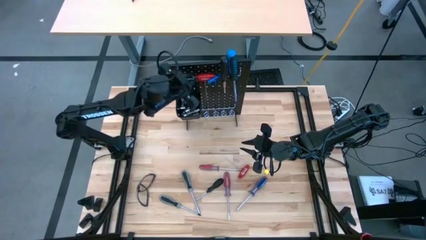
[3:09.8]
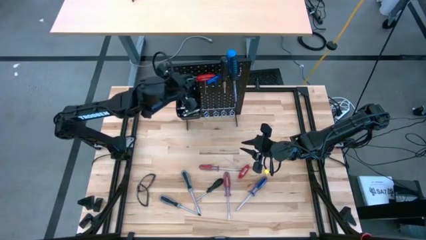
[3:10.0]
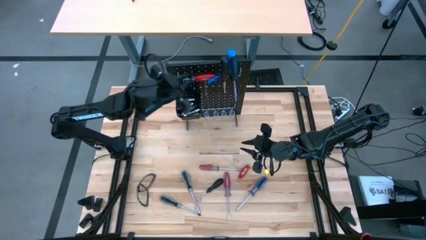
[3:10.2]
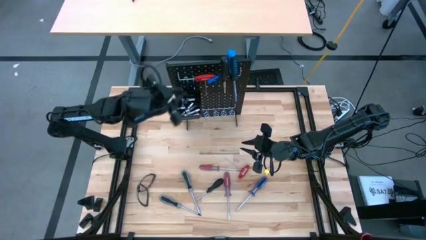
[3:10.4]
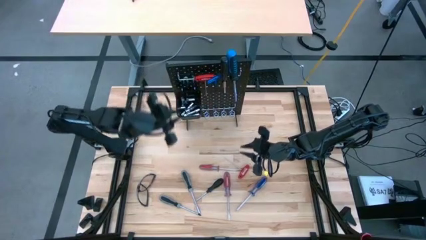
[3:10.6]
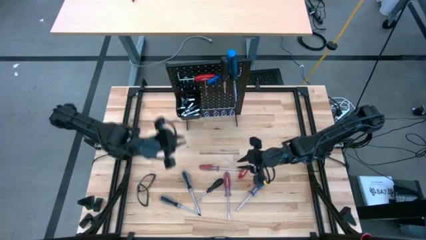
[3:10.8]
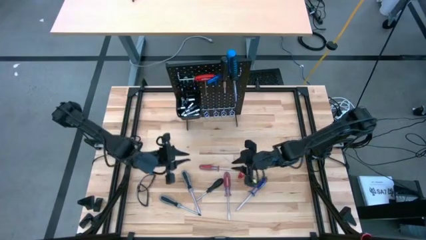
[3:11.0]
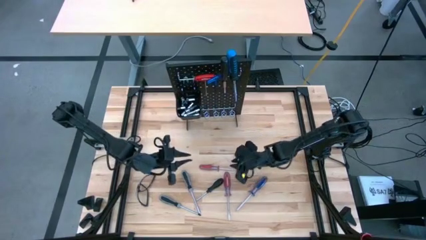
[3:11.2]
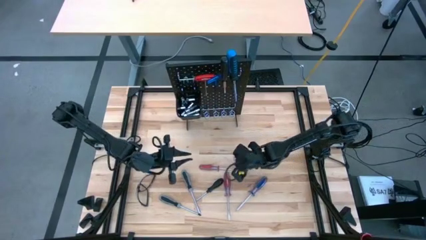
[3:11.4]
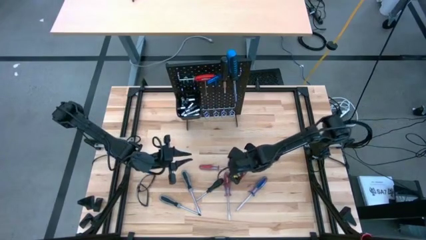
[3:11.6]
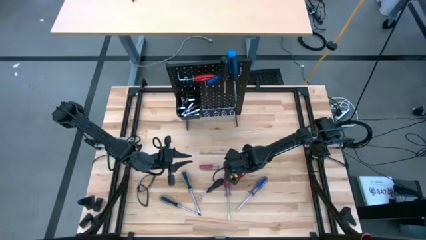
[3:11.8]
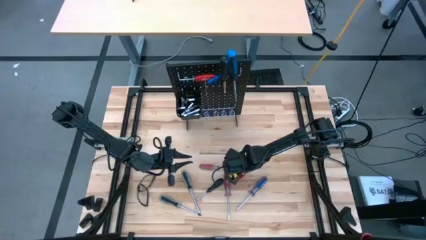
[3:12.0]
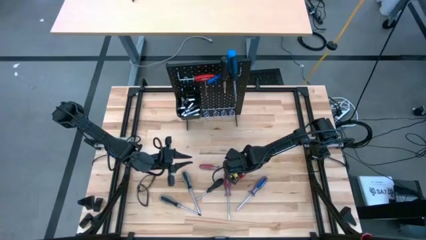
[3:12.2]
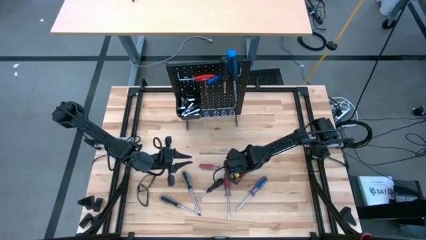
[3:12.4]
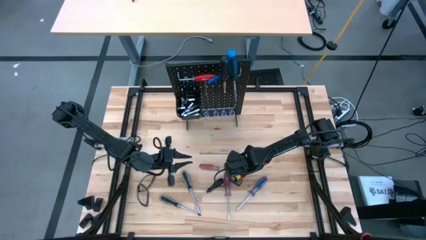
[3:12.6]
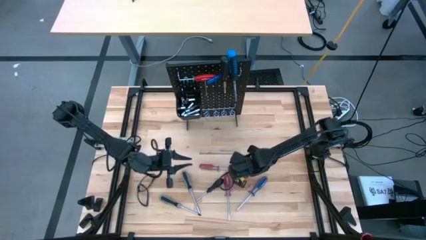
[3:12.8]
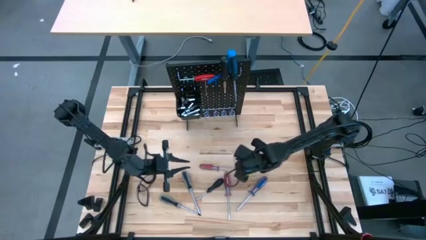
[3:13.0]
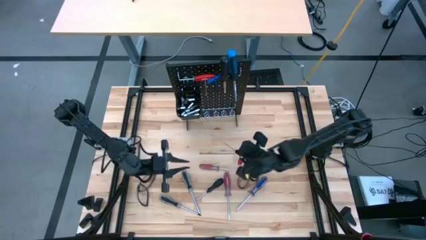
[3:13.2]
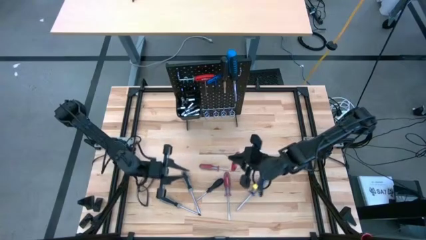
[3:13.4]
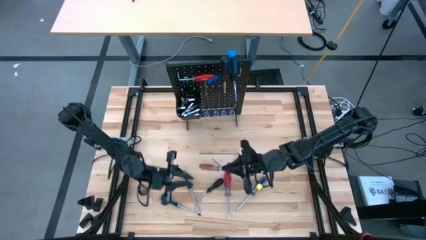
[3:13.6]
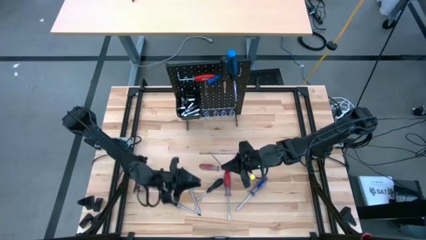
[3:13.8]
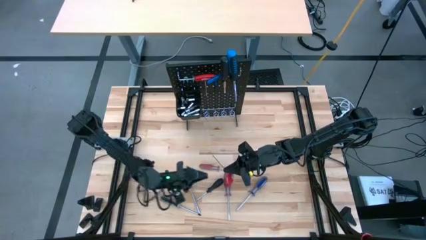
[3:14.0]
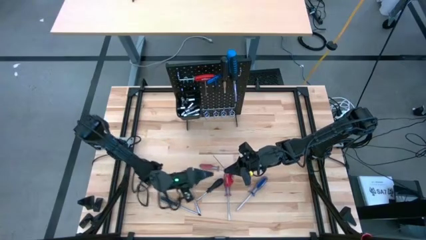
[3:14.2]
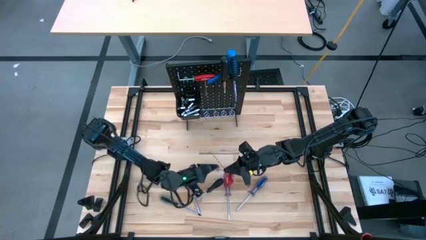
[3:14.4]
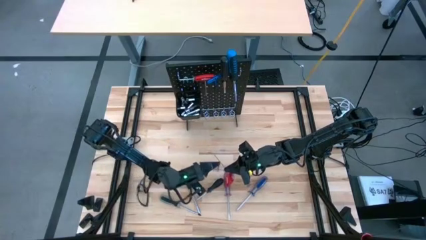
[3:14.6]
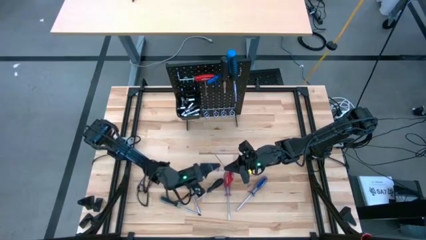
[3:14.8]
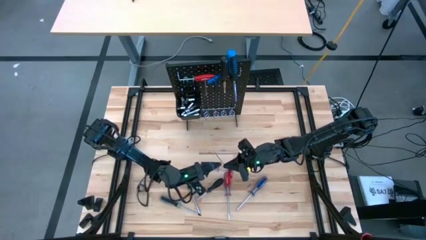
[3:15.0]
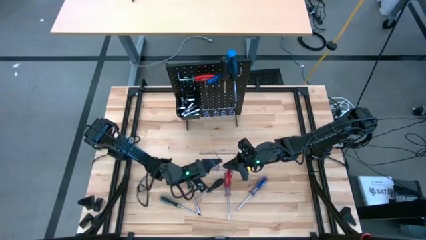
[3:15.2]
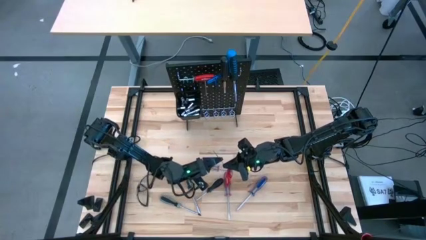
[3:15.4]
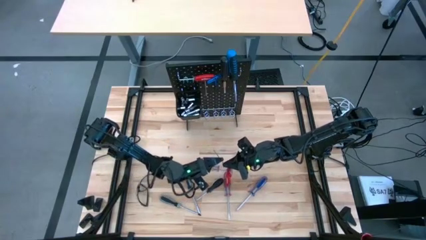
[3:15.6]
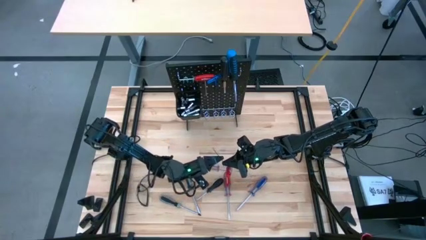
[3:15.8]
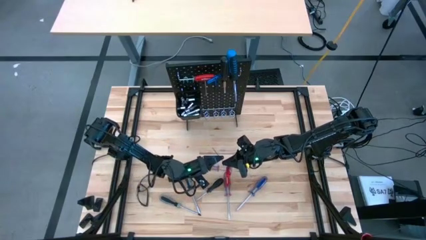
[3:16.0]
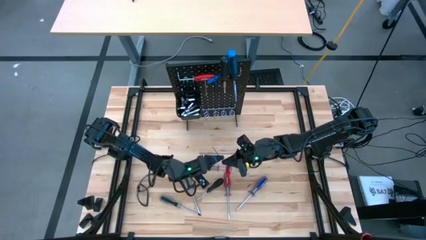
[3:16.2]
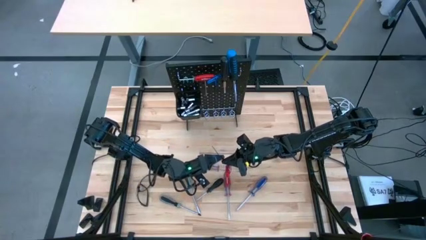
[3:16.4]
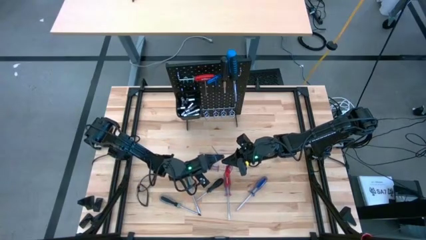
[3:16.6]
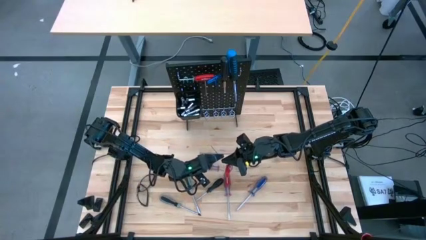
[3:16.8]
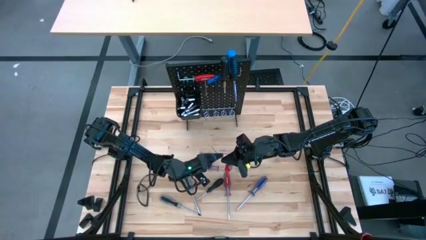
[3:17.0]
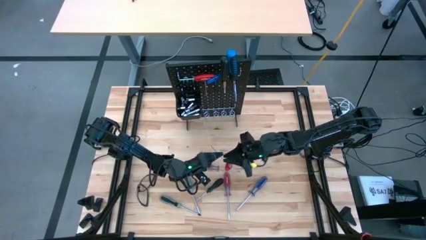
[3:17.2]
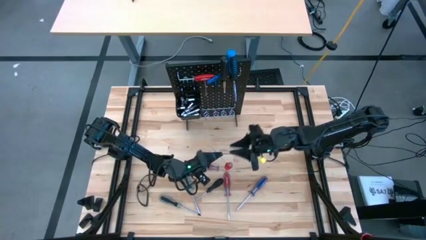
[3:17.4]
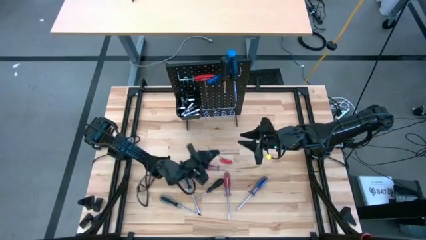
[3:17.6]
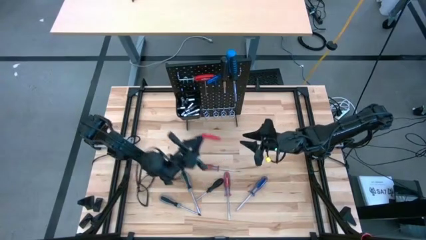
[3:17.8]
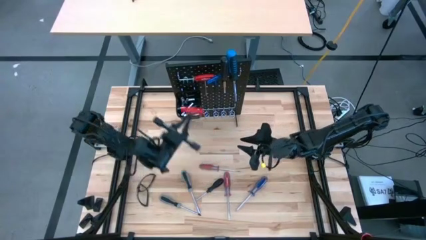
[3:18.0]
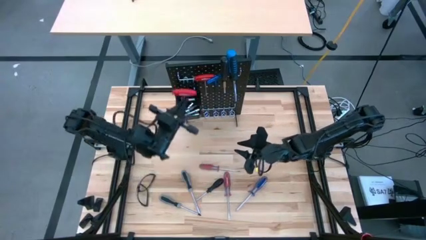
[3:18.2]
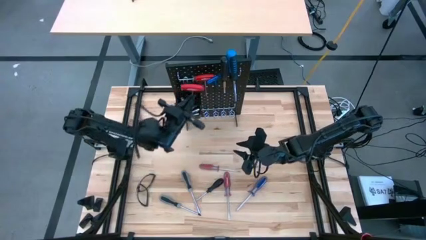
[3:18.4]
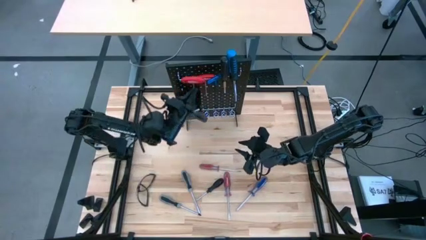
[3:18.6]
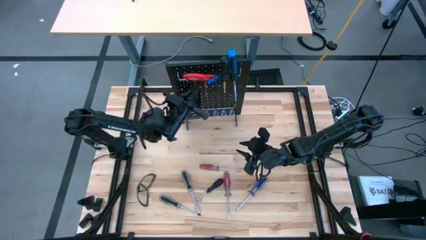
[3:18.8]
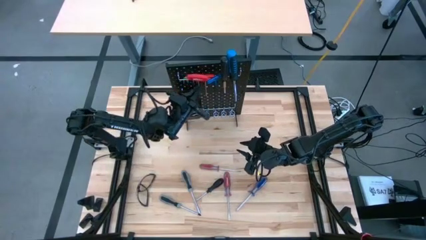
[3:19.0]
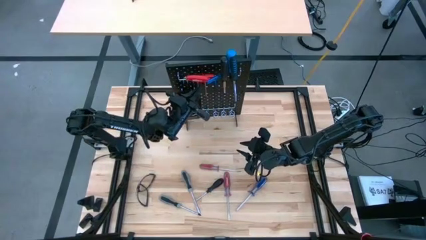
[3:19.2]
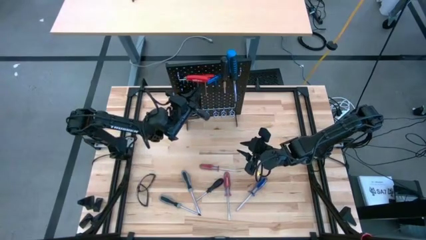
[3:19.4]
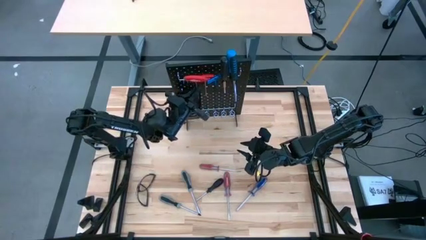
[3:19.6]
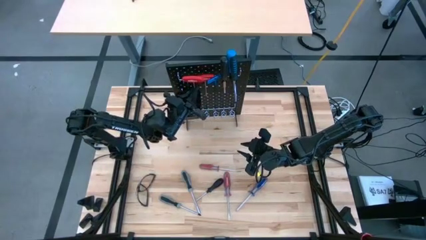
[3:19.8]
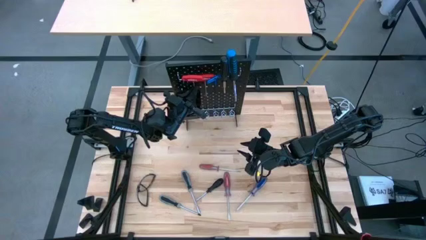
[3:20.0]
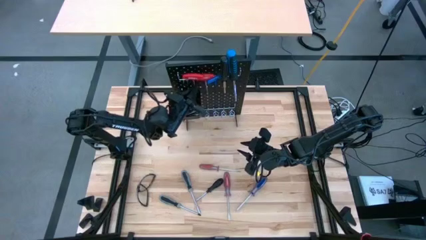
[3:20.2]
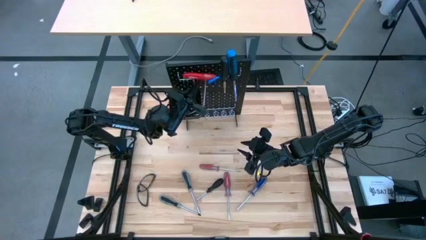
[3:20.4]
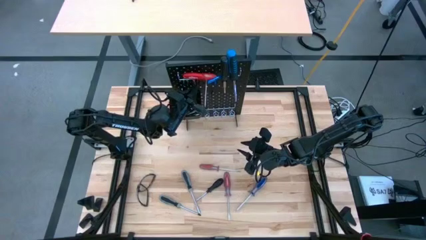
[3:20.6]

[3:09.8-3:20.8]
Task: Hang tools onto peg board
Hang the red allen wrench on the pegboard

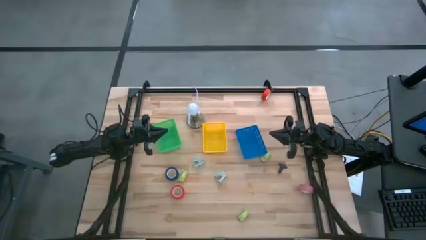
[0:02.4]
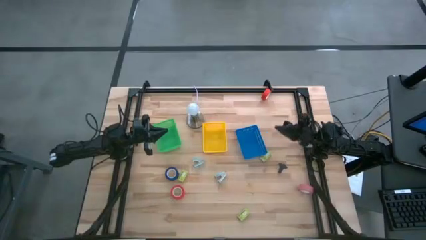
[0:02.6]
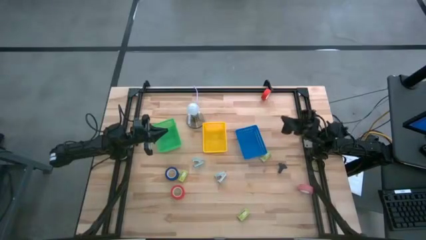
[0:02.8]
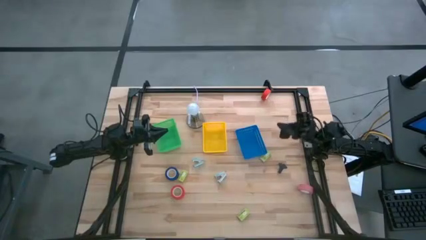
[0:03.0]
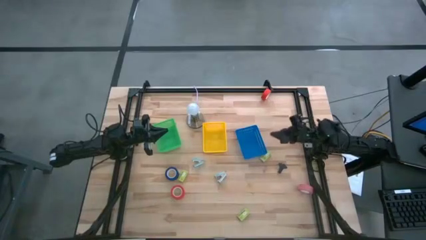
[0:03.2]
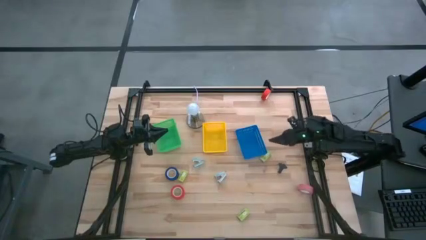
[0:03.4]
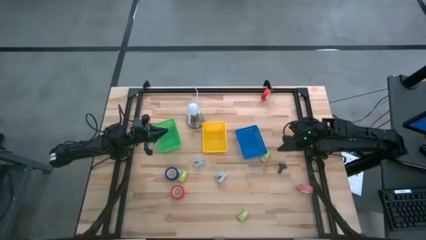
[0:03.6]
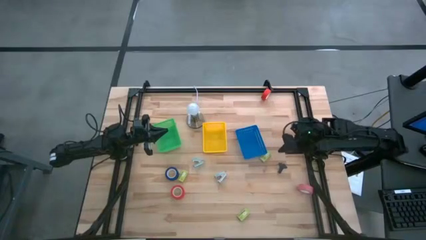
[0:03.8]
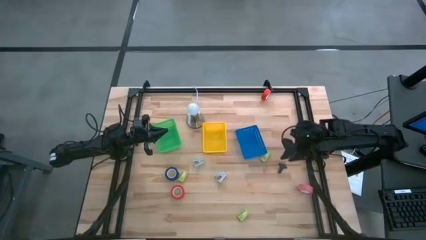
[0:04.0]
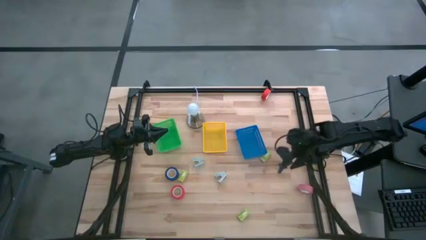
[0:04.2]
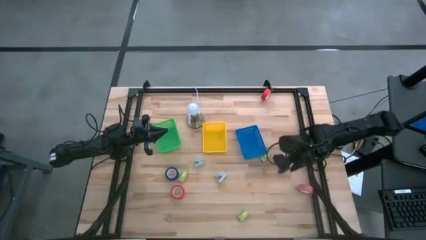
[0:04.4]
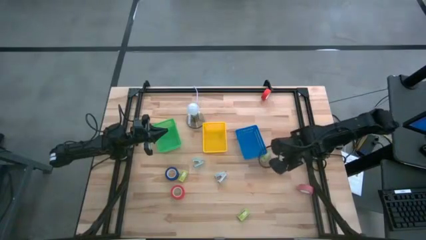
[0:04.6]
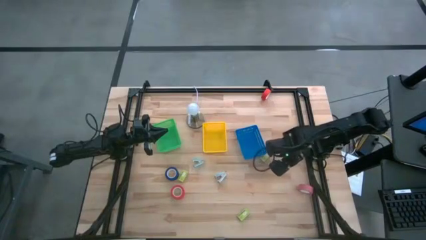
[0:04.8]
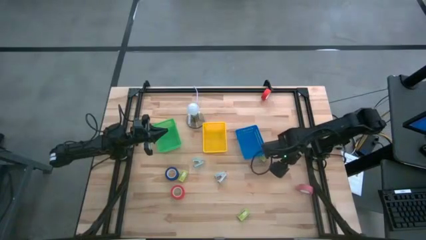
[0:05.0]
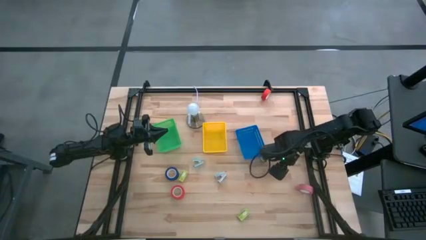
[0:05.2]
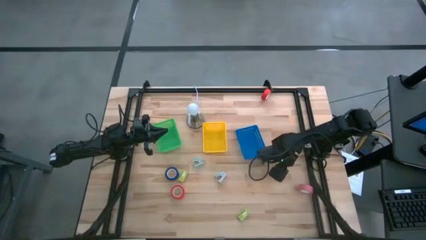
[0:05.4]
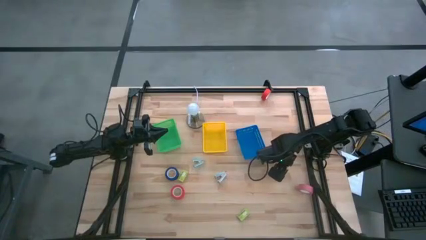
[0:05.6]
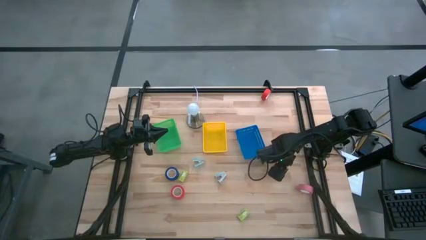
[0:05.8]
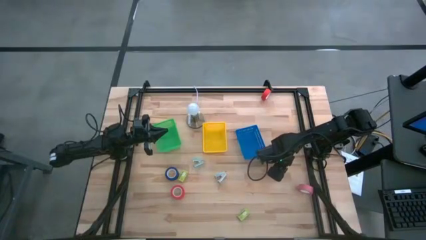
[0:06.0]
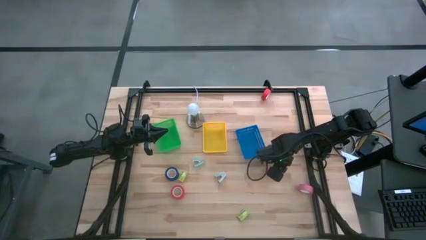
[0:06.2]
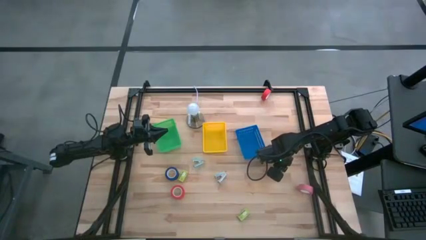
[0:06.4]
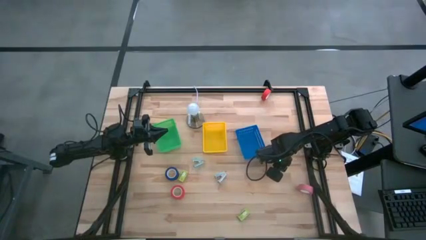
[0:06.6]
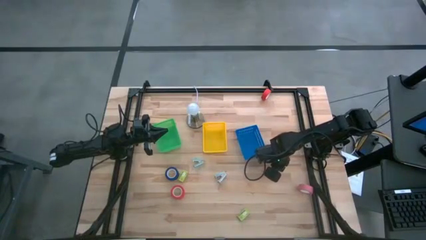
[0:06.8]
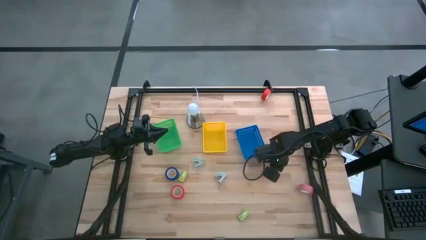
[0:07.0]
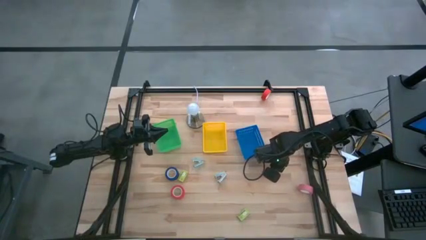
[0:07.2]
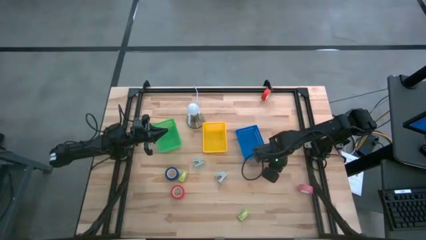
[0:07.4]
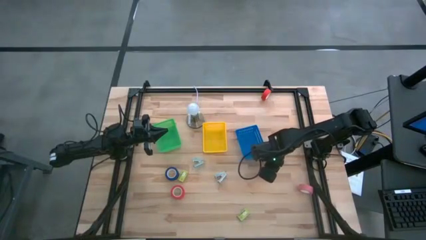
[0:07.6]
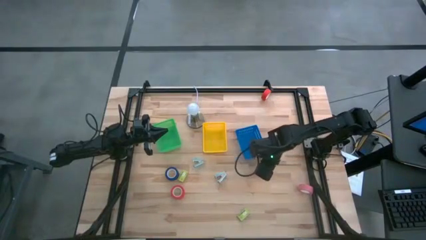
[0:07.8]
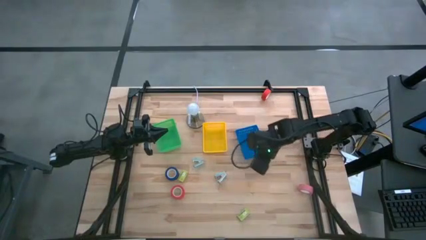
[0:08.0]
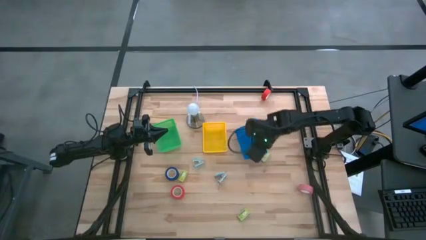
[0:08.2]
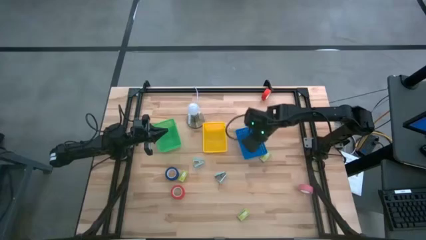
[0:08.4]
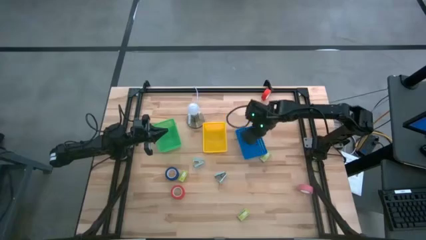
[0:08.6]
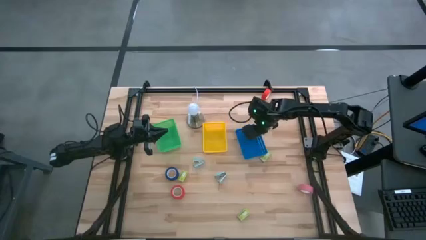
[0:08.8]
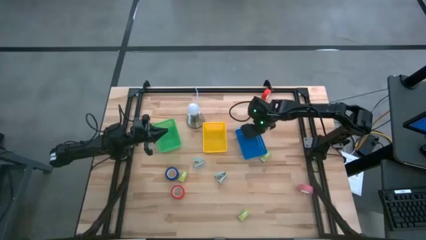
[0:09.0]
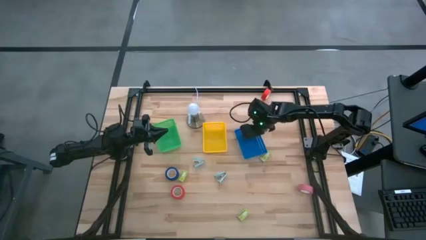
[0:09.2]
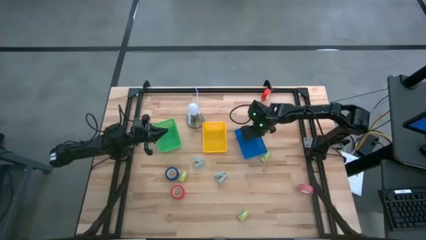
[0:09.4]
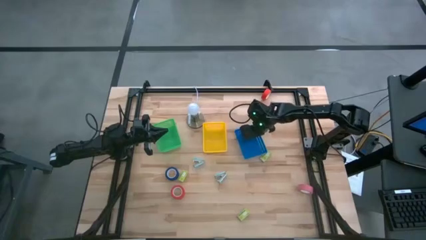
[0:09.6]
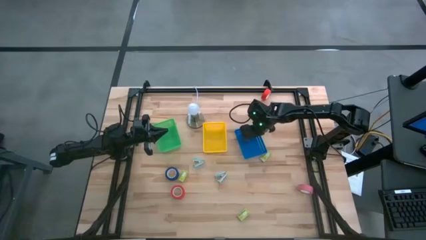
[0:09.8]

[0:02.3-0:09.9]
Task: Pick and place Stapler, Stapler remover, tape
Put the black staple remover into the blue basket
